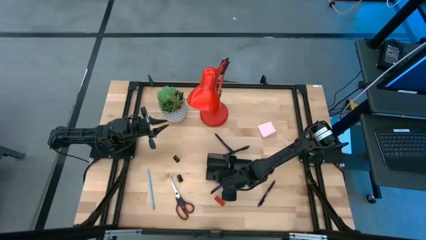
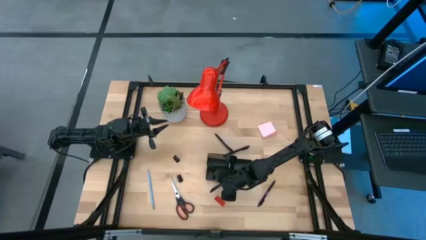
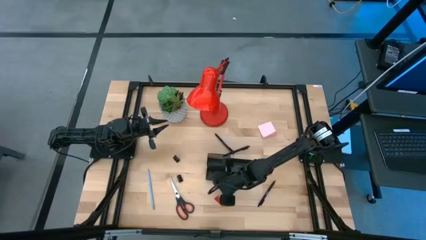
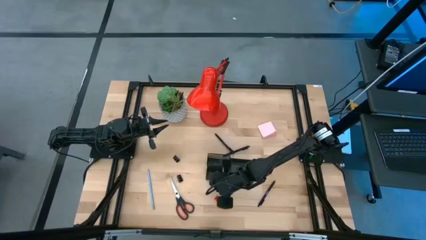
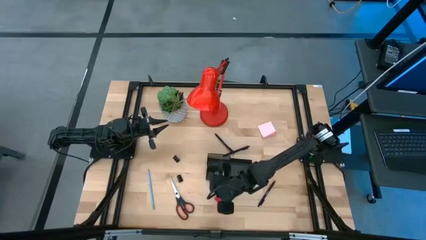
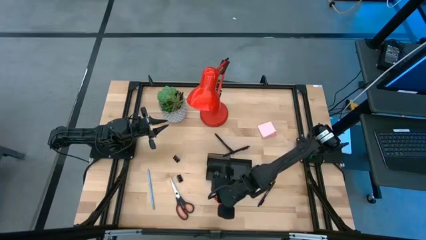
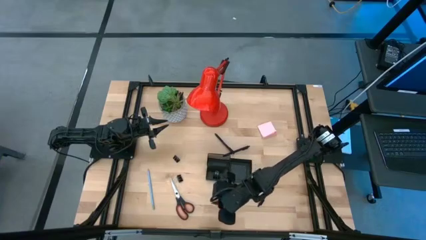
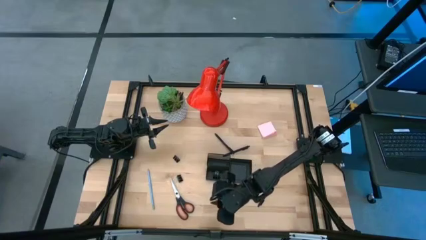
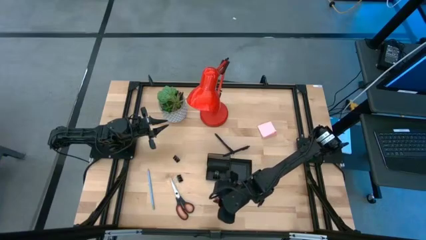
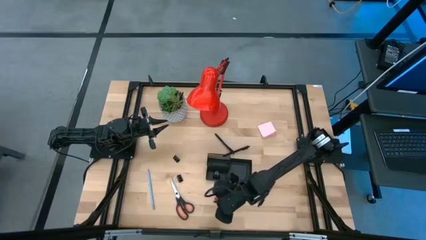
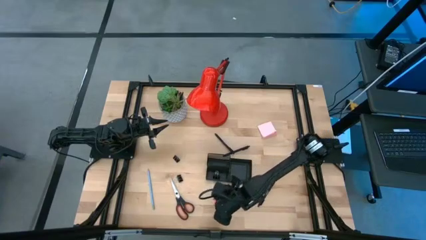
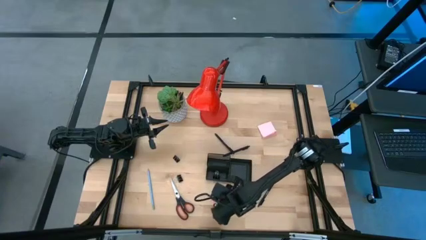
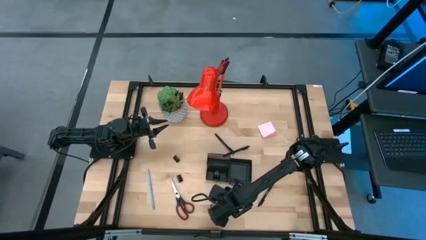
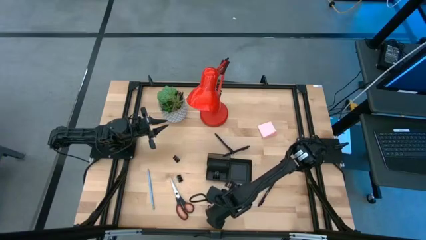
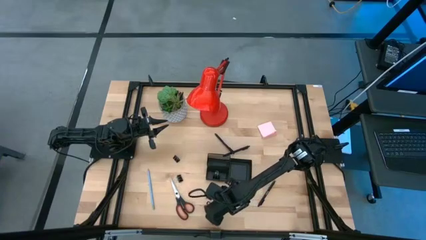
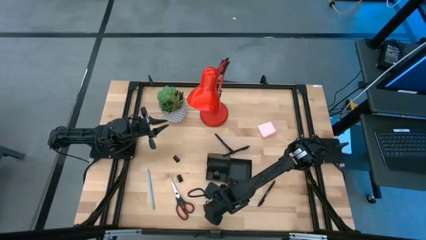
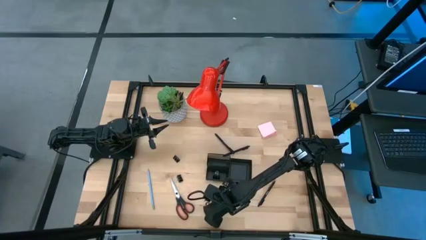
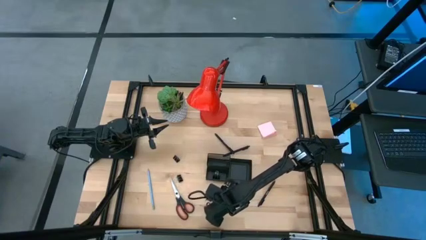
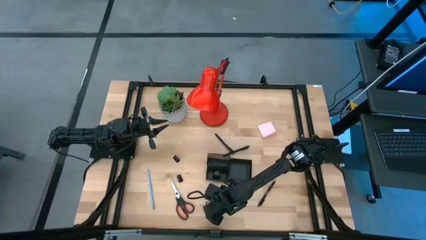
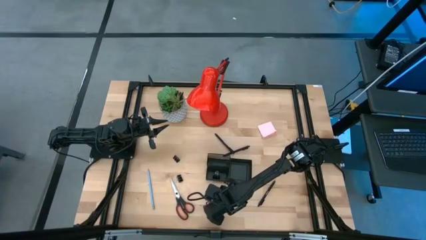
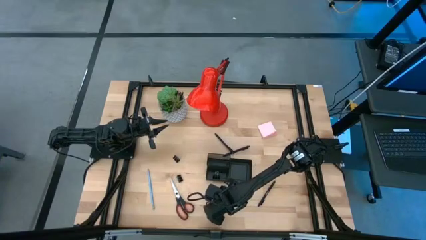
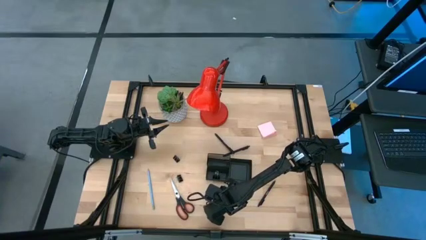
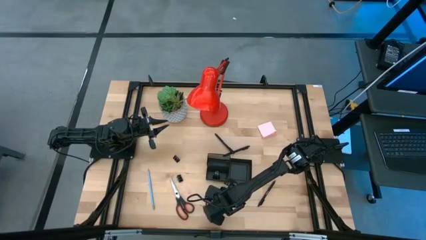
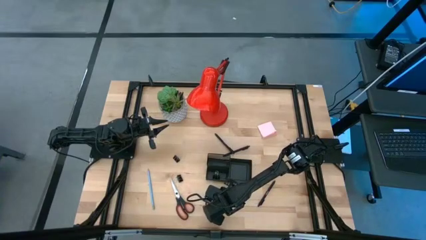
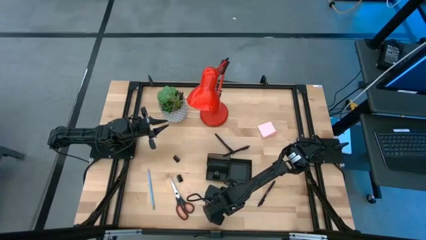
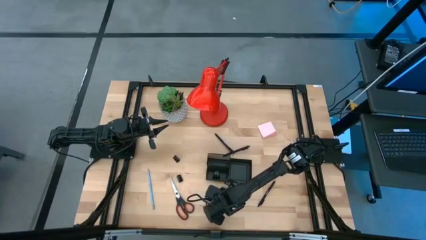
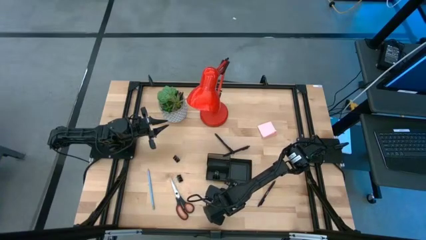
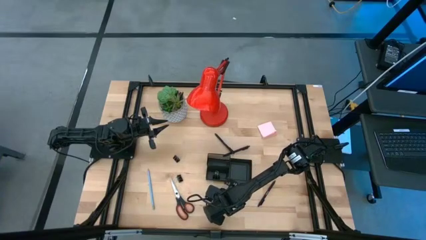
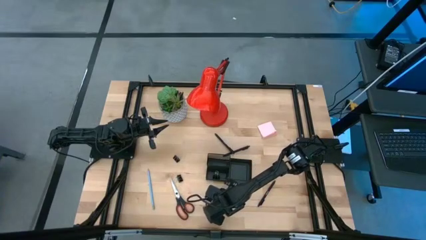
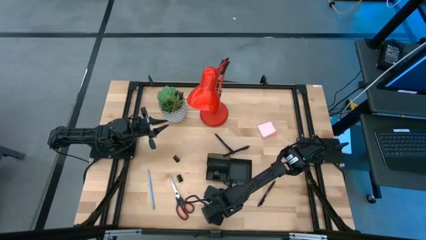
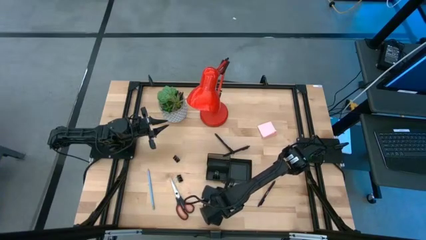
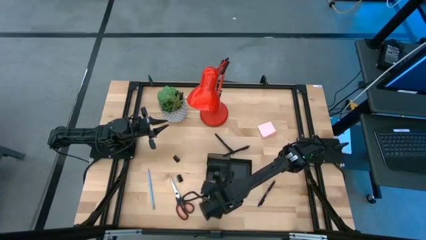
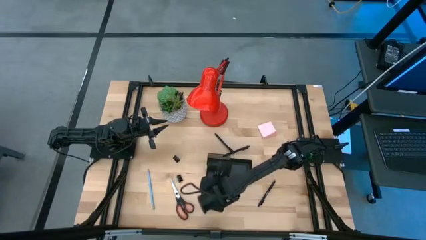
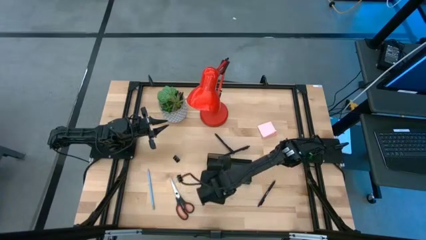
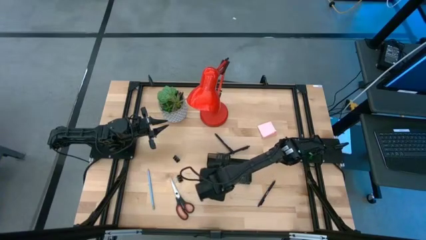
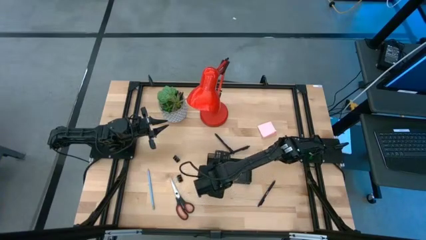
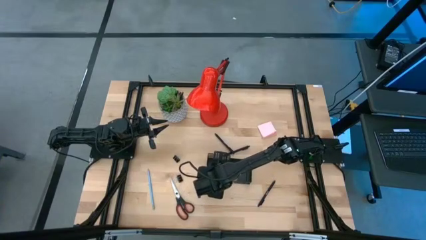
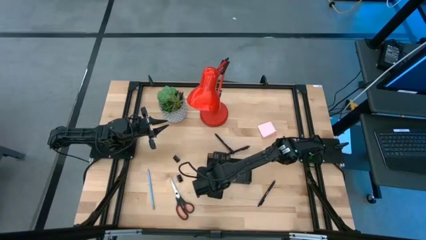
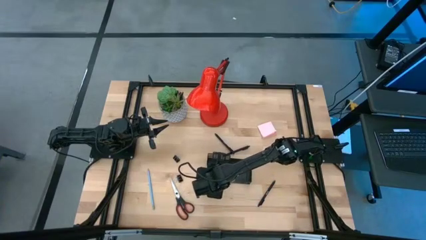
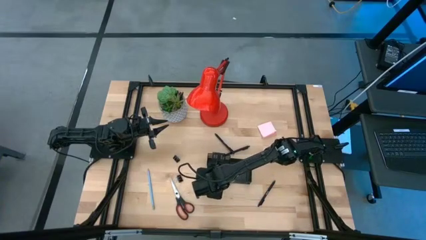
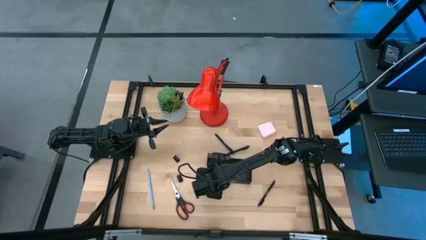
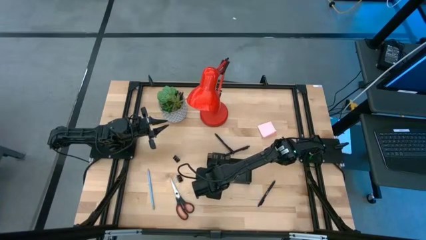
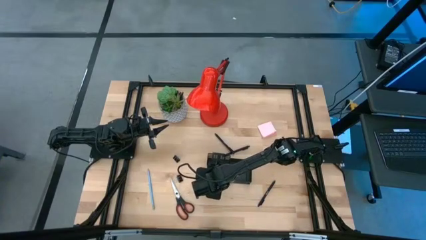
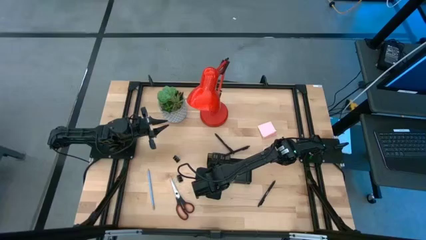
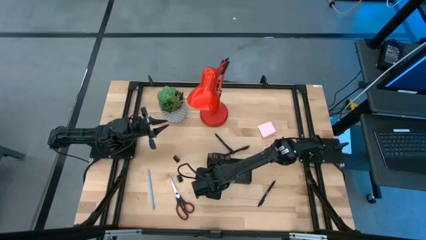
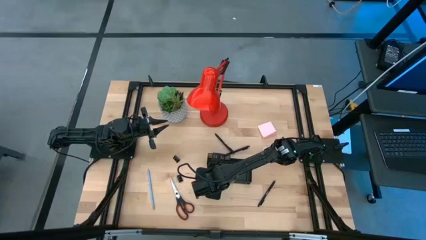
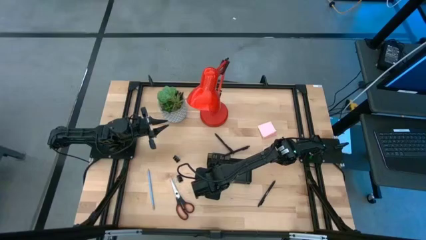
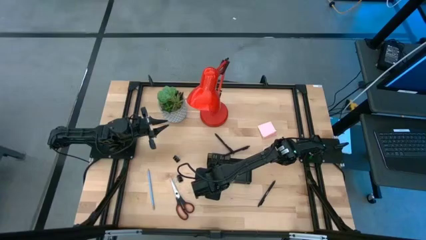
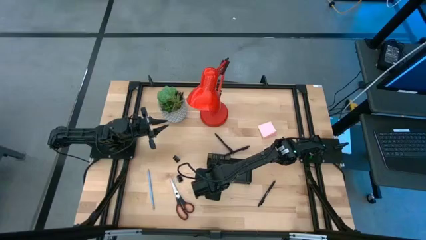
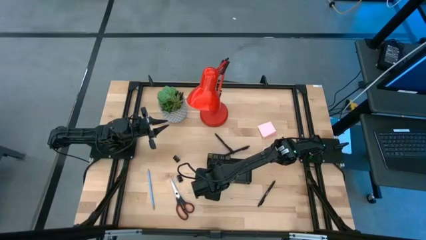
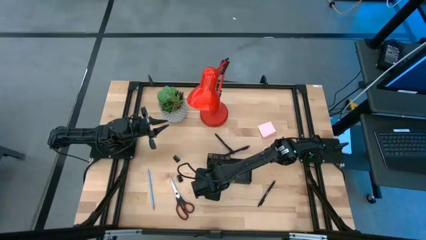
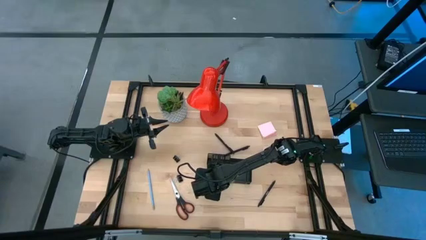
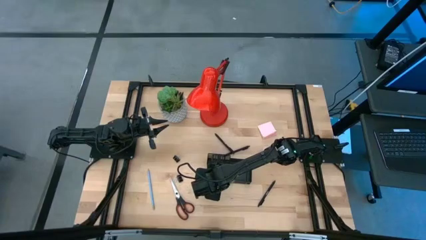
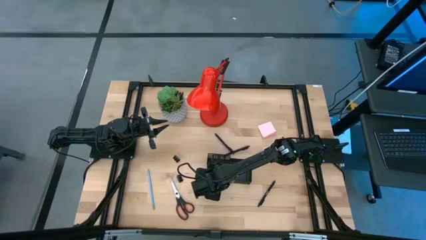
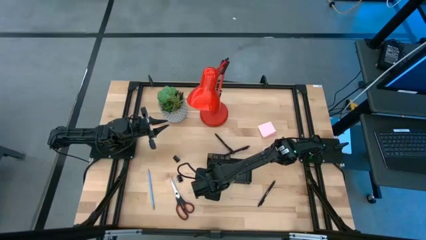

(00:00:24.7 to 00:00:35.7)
Task: Pick and place office supplies into organizer
Put the orange eraser into the black desk organizer

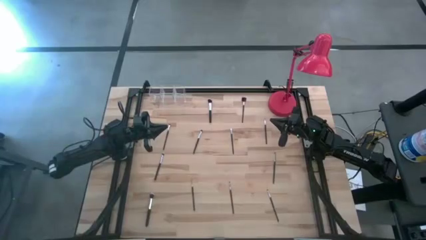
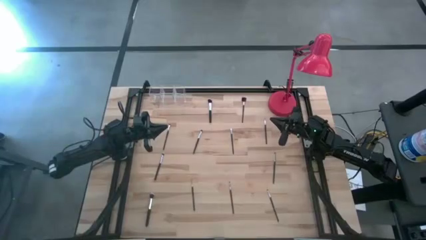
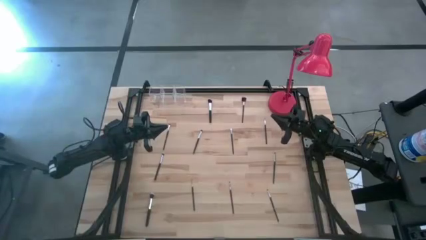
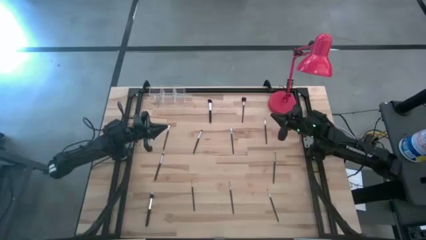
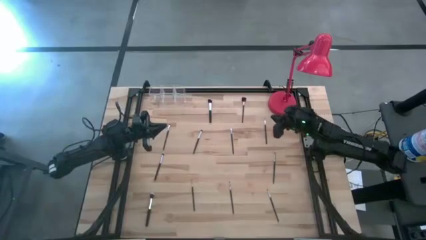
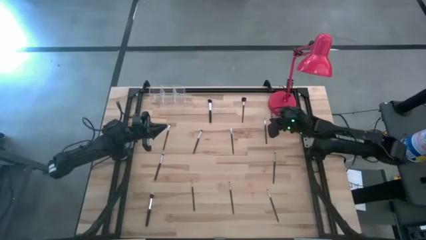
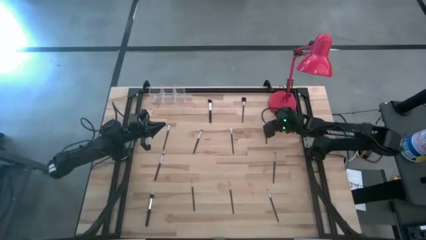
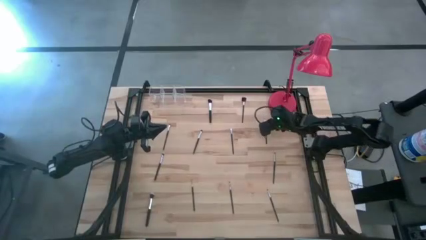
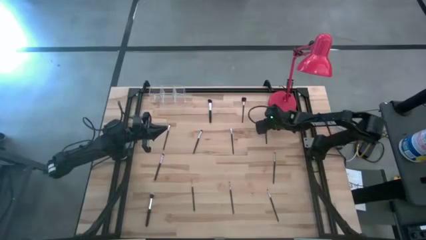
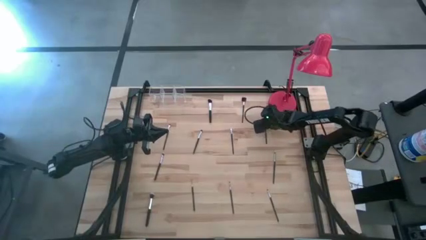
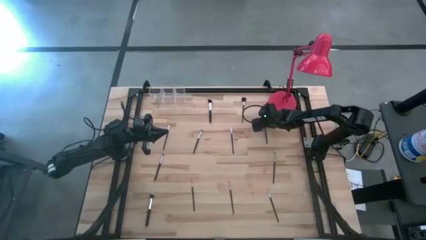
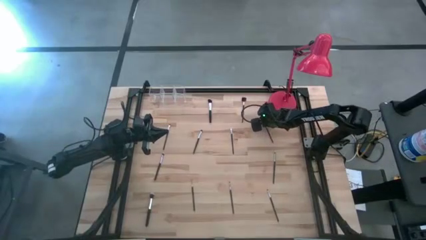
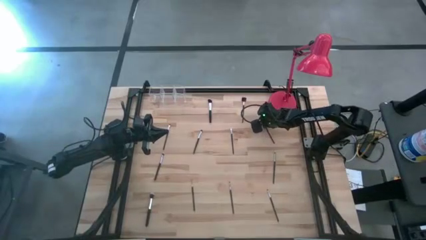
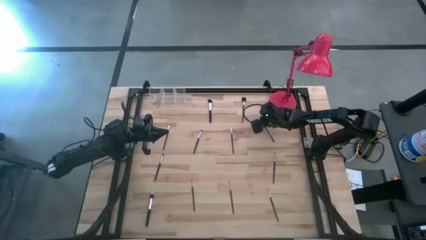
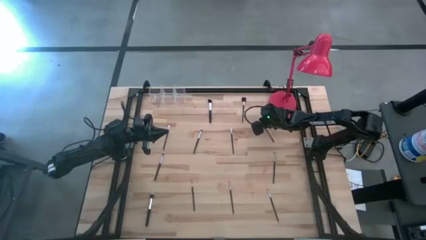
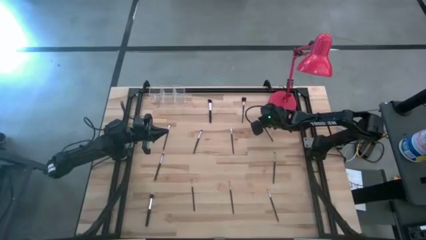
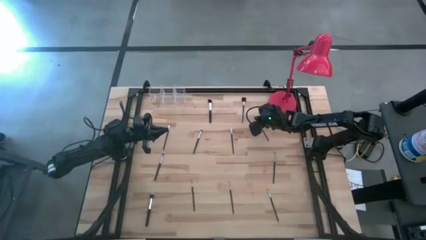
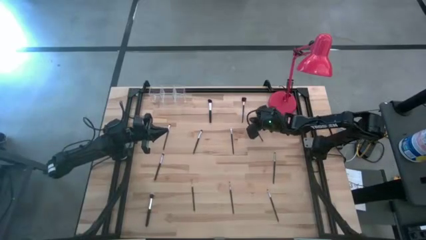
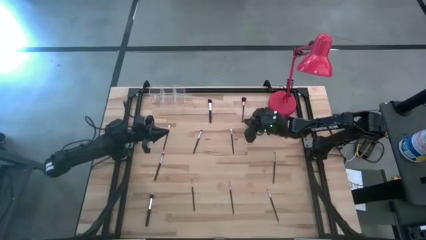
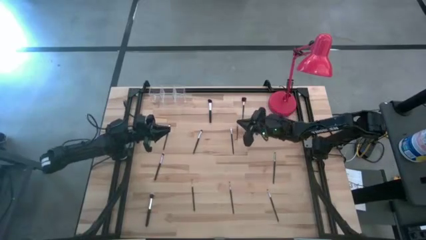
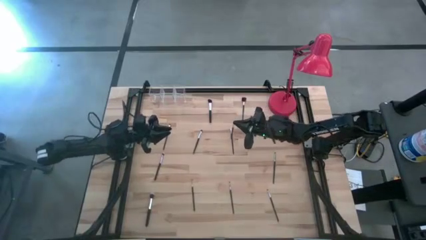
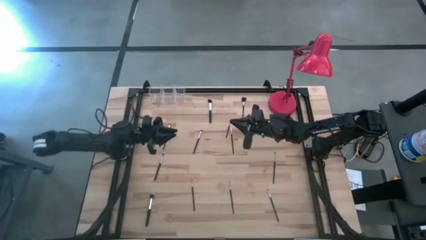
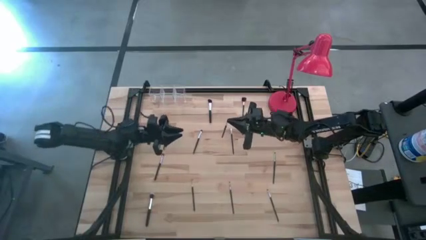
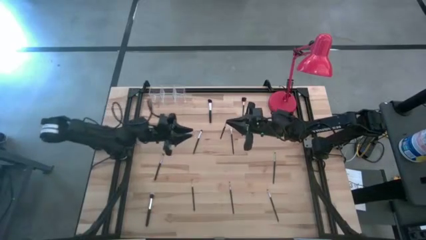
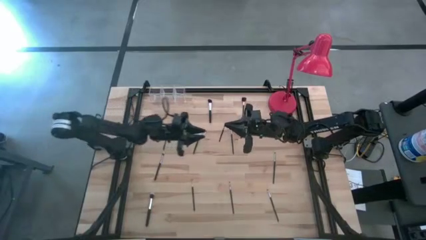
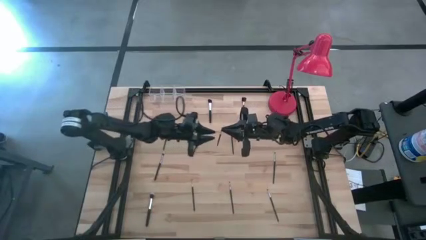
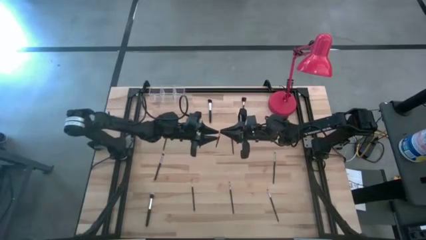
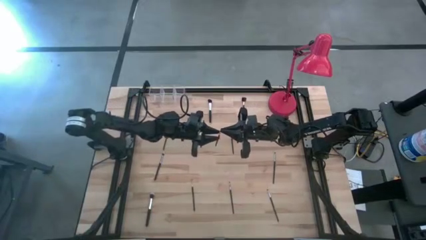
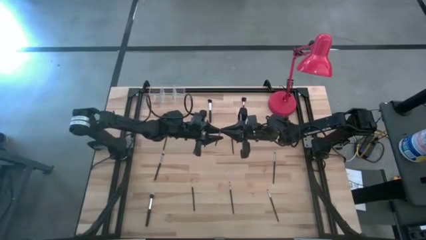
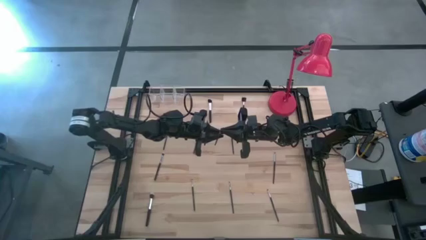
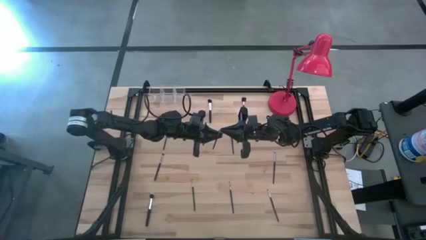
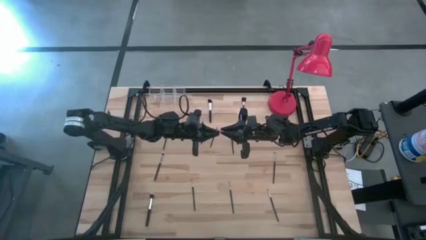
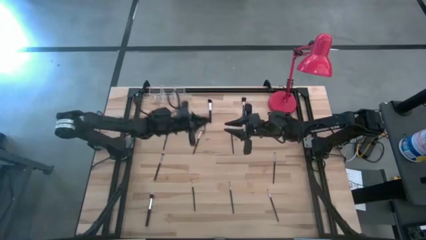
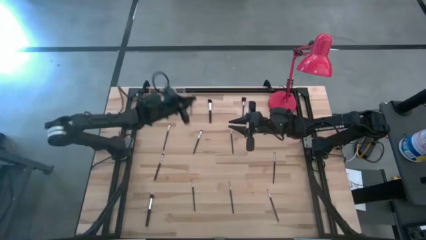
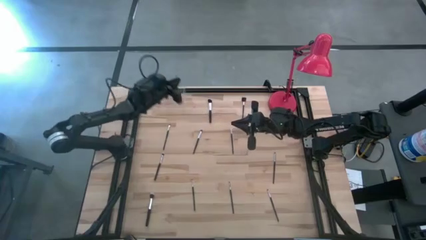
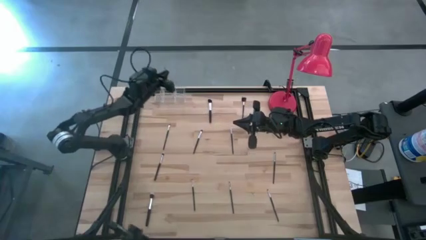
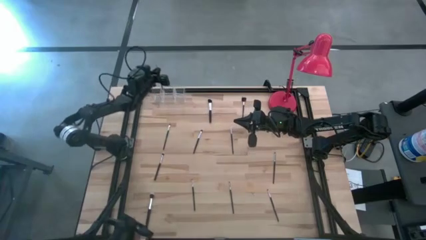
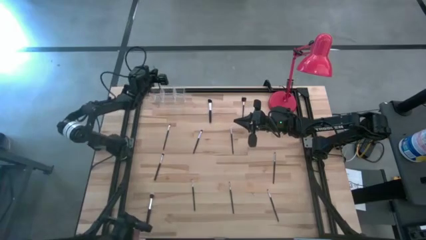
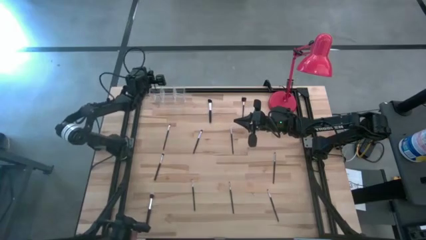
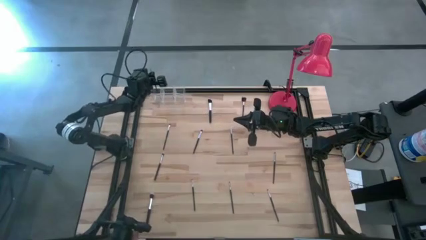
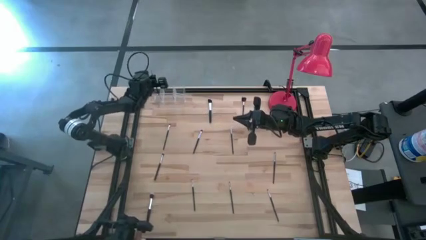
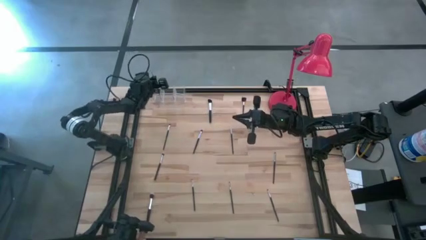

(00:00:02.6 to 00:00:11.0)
Task: Pick & Place Makeup Brushes
Put the eyeshadow brush into the transparent organizer
